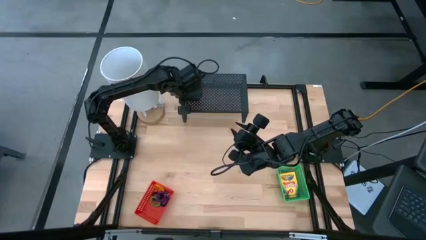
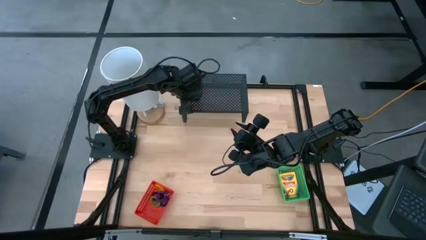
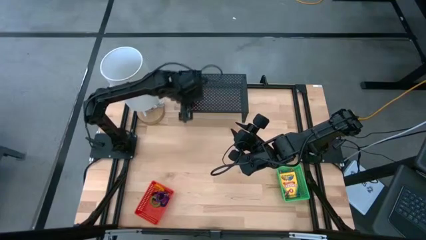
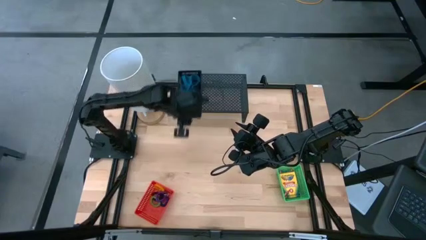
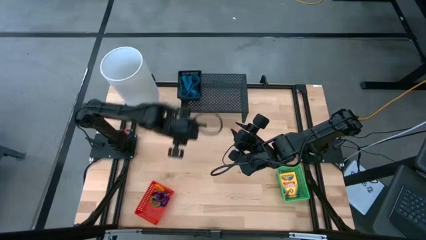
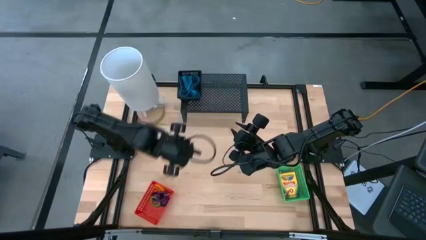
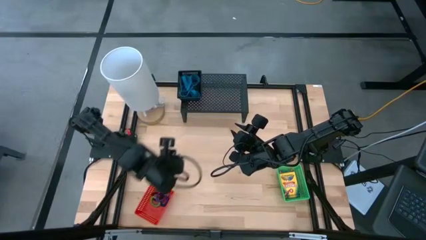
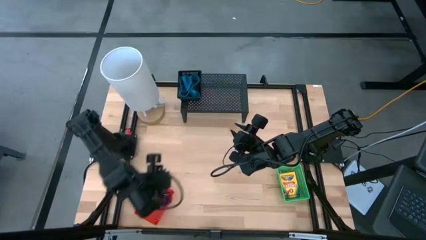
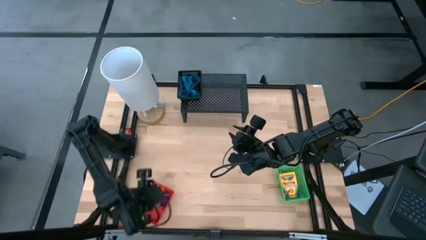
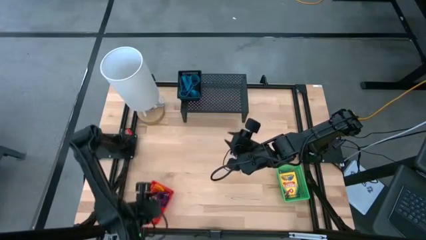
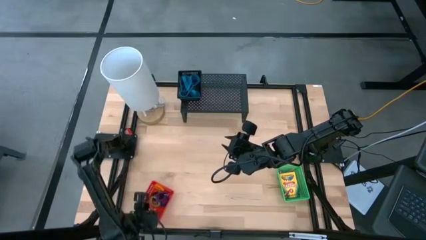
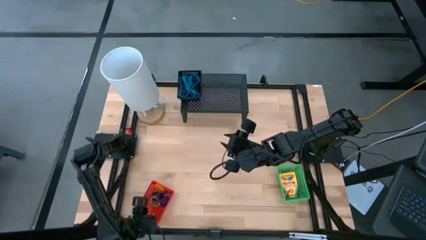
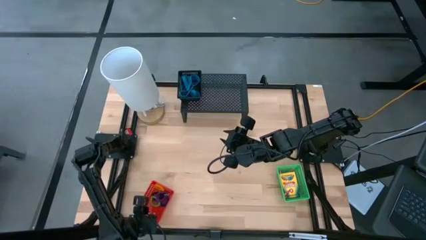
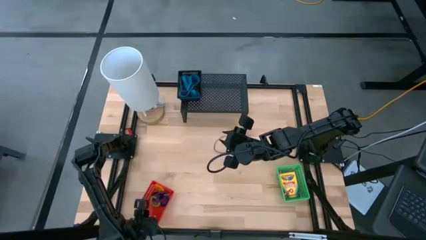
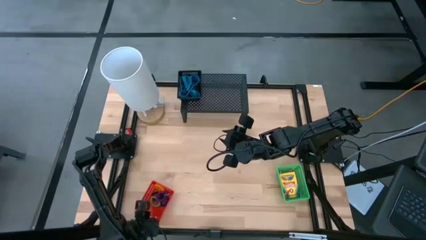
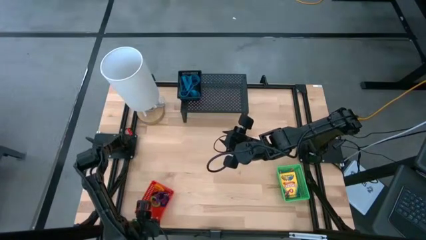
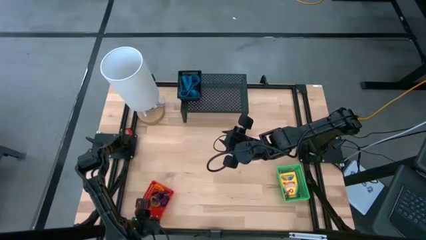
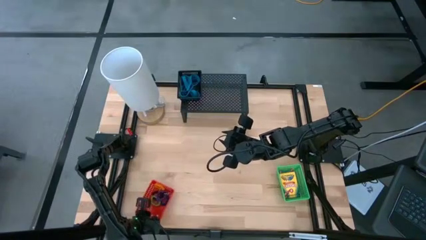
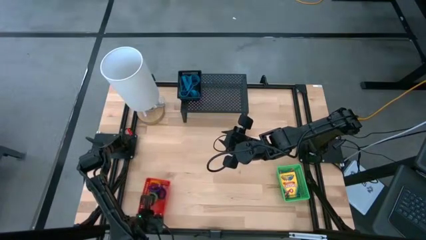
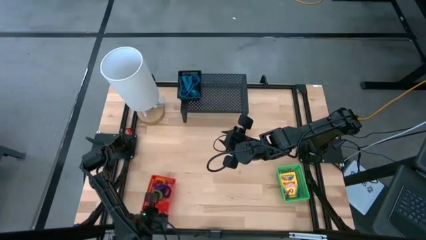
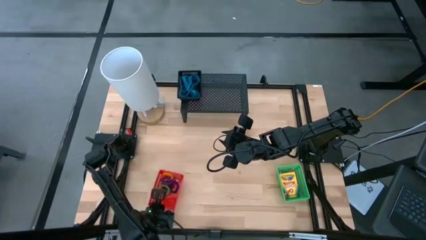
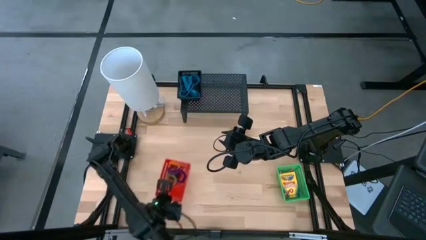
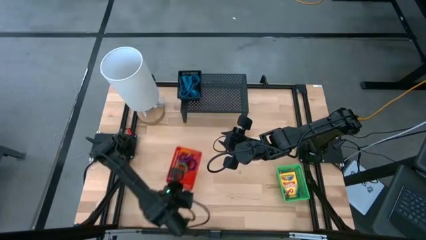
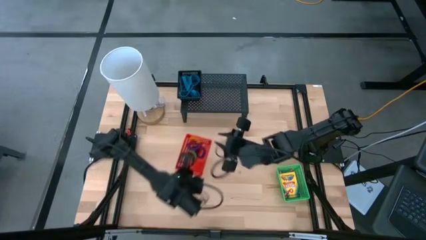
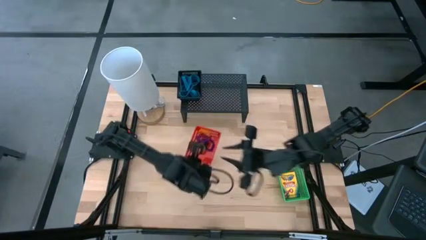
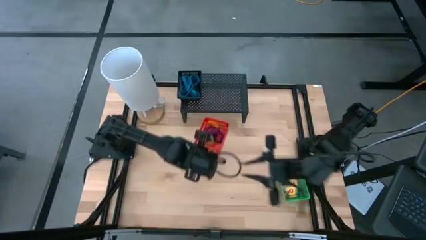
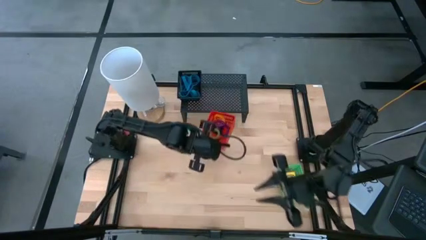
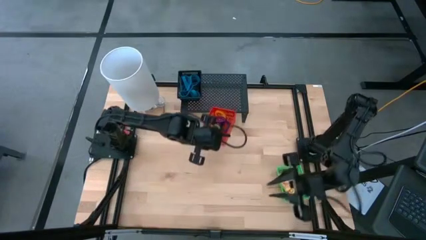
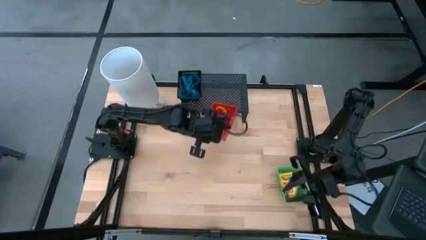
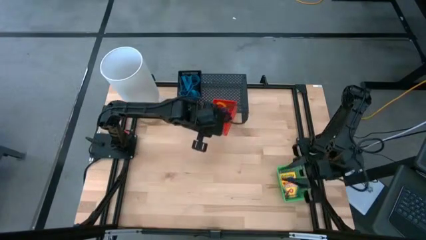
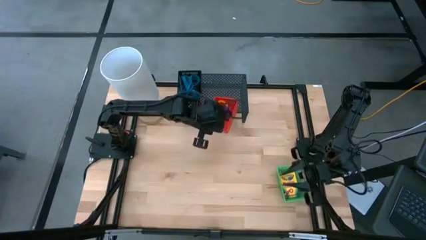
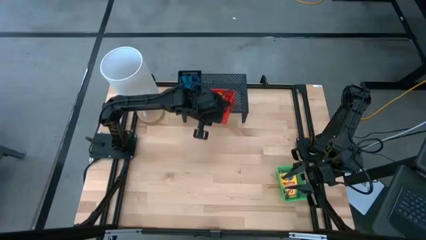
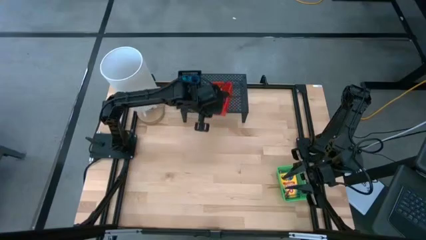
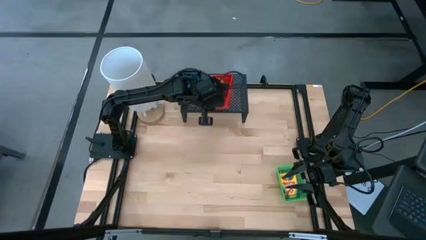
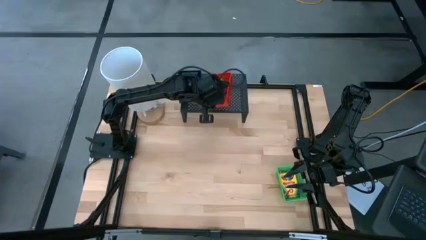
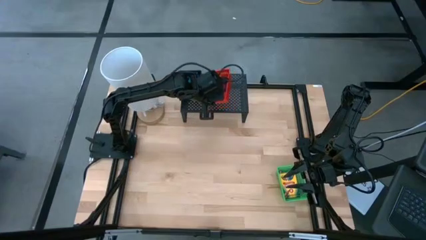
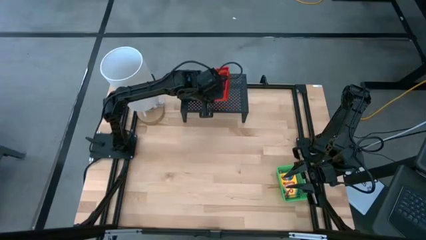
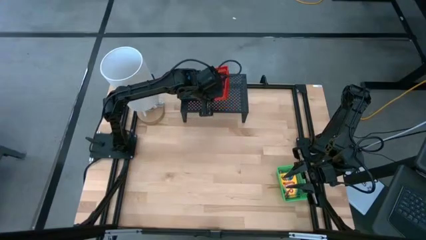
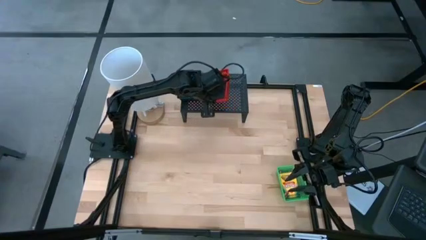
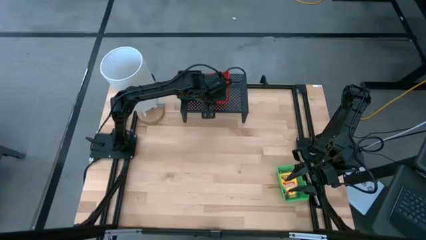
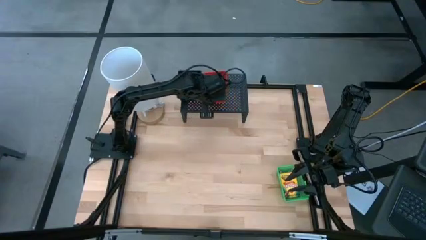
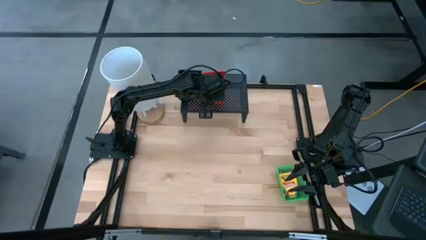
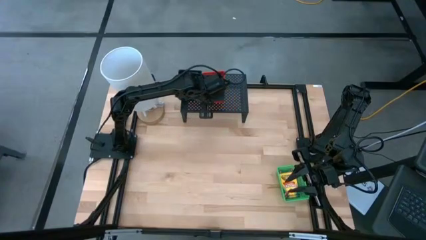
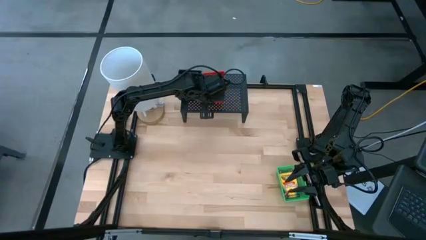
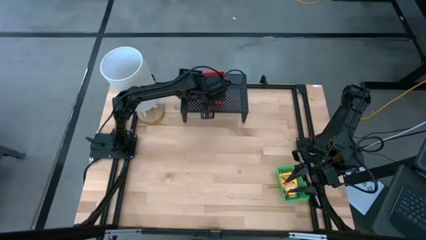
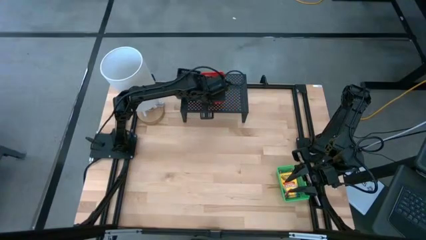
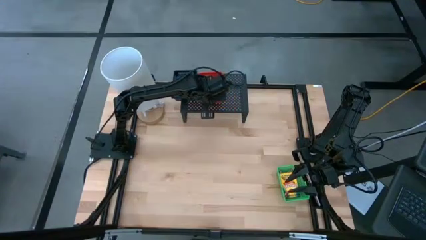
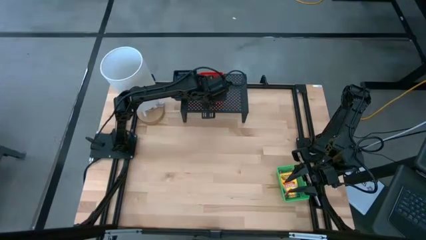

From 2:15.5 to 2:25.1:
Task: Pick & Place Office Desk Supplies
Put the red bin filled with spring keychain on the shelf

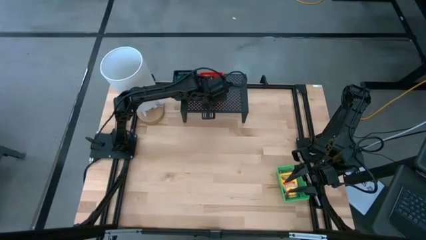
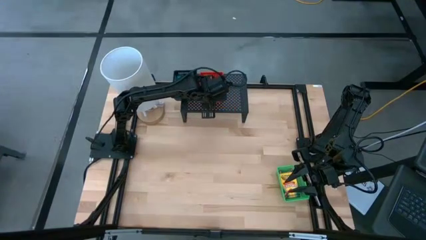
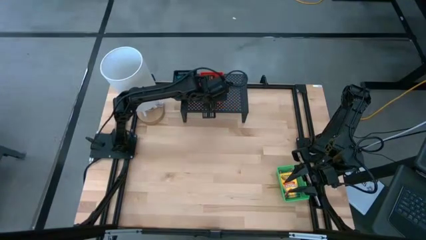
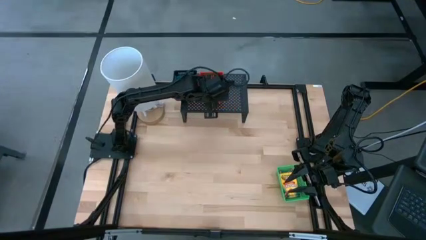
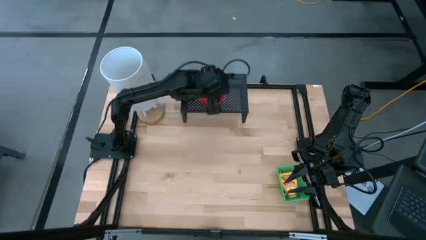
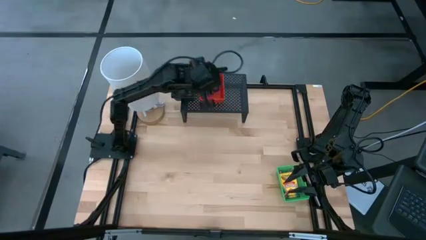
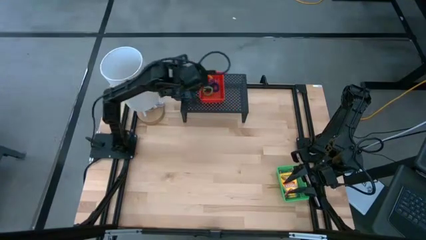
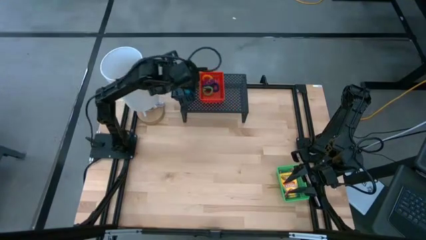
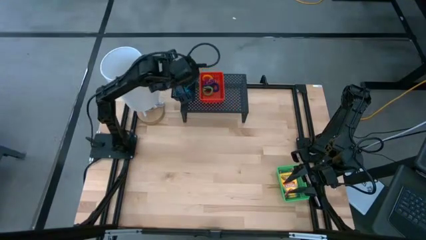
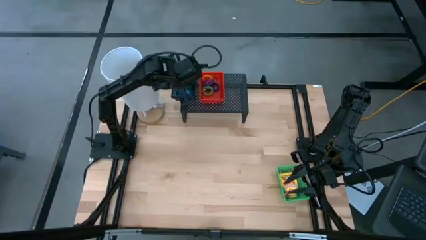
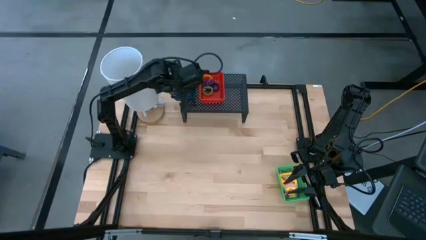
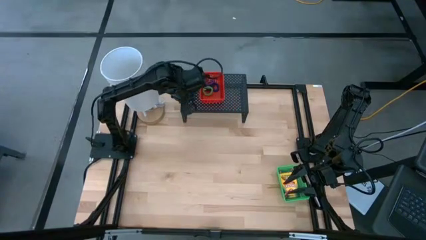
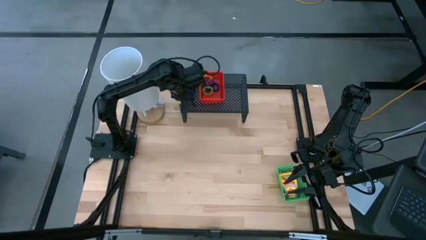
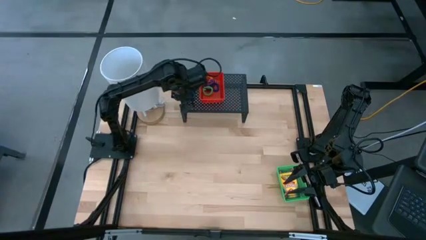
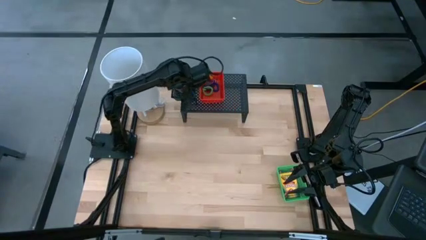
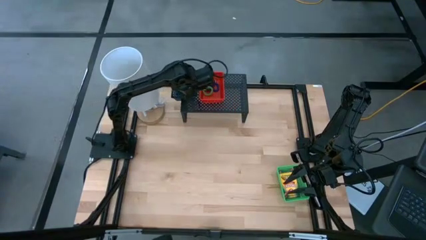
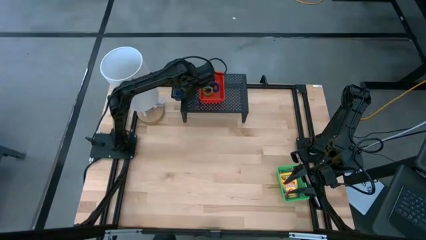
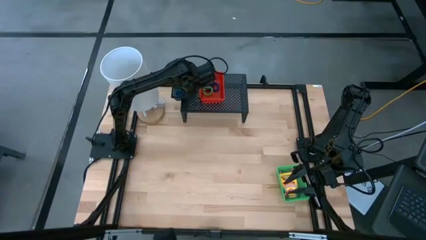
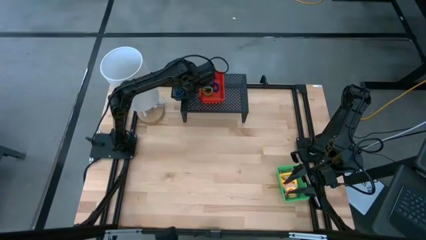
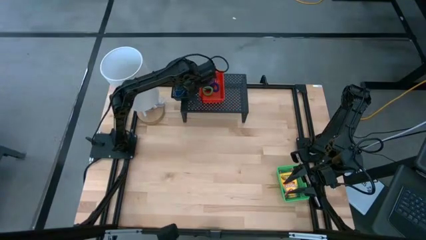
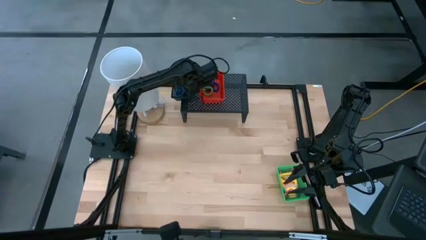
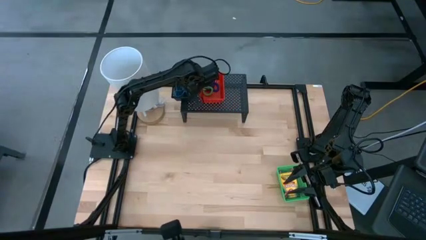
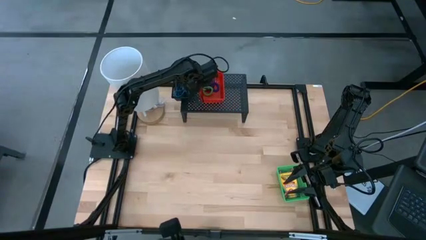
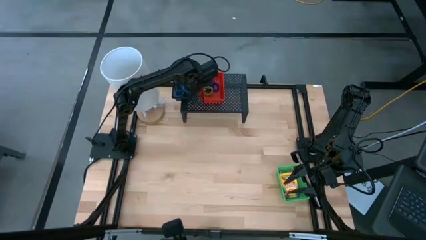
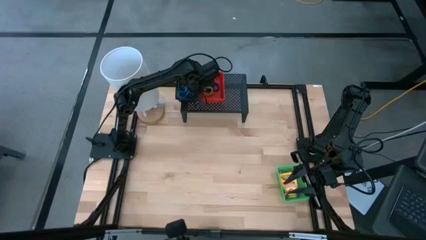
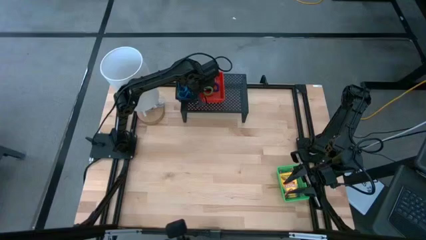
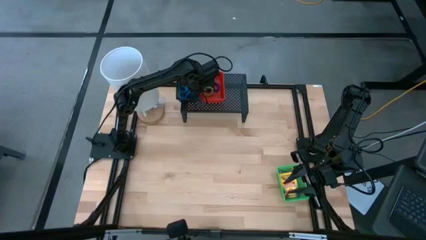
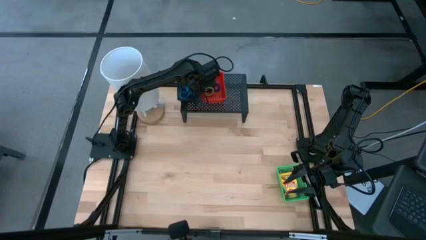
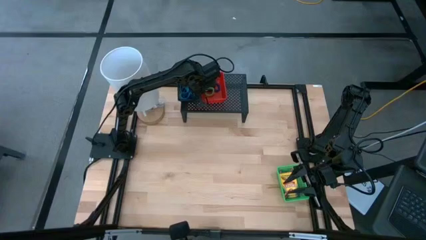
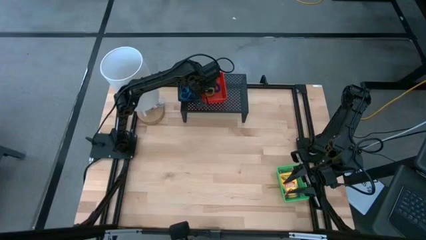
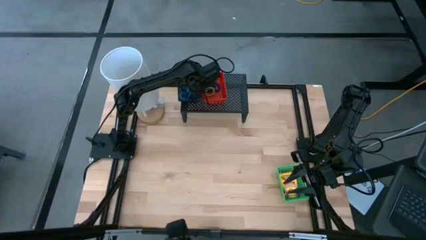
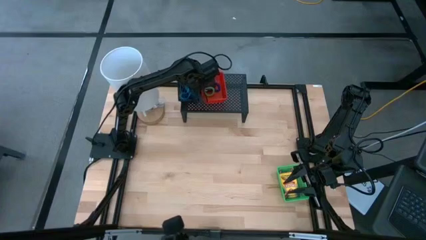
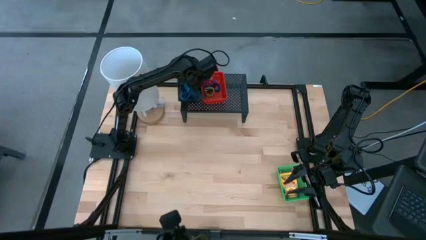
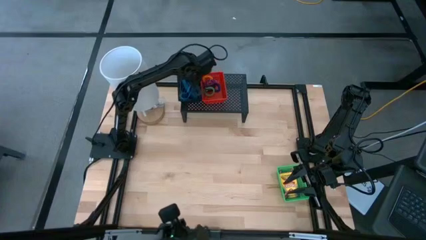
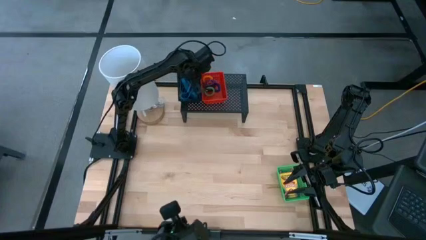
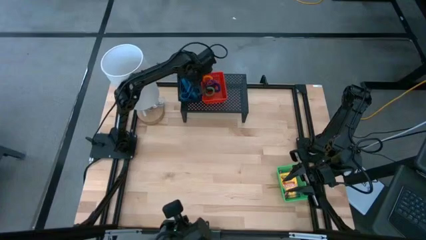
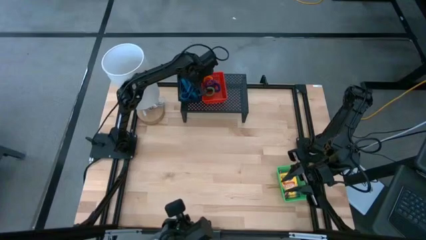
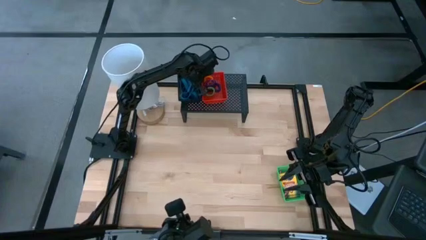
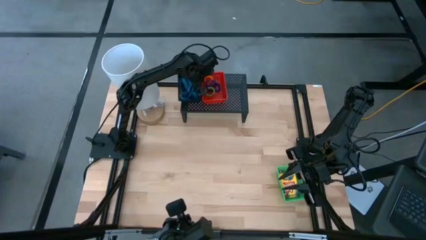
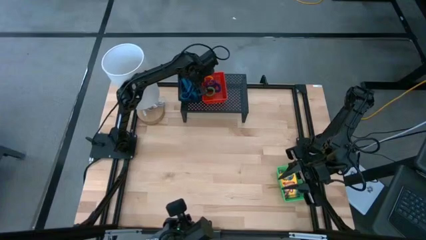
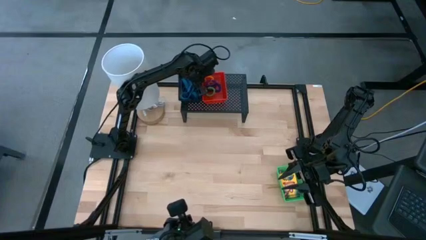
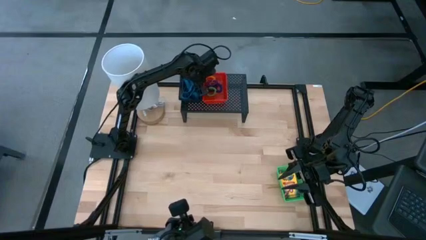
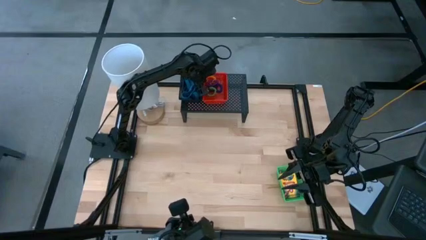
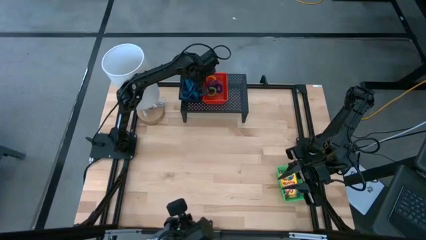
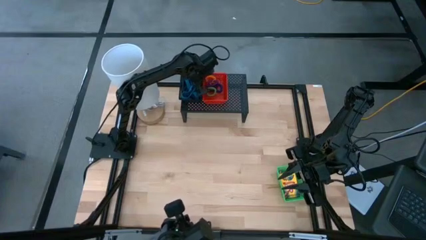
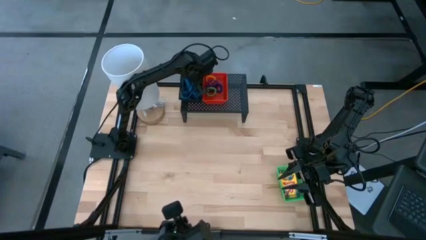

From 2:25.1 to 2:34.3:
Adjust the black bin on the shelf
